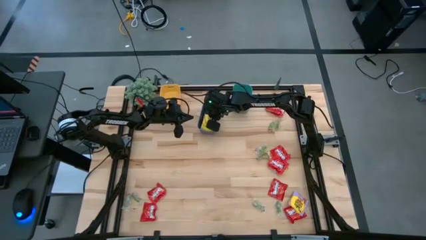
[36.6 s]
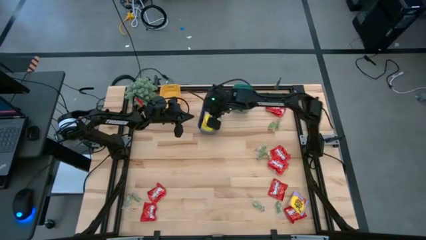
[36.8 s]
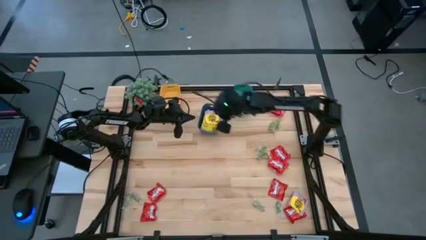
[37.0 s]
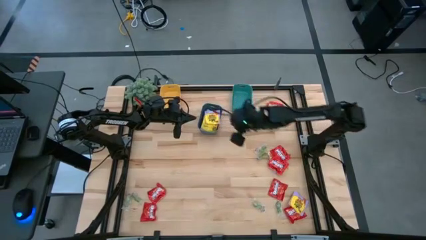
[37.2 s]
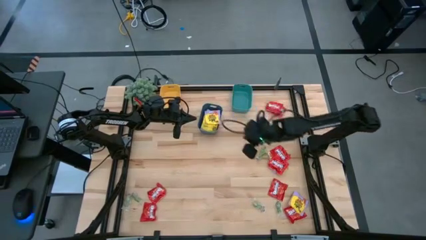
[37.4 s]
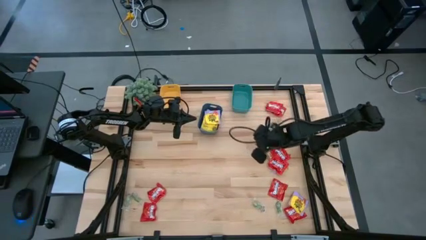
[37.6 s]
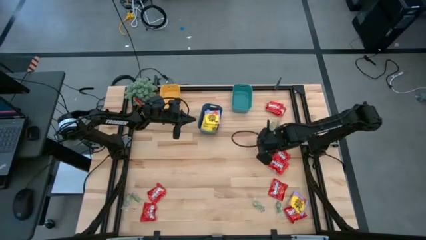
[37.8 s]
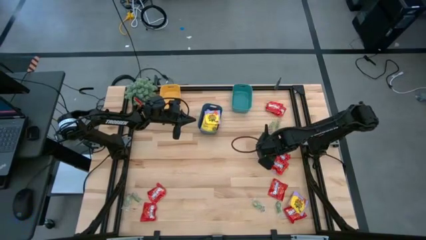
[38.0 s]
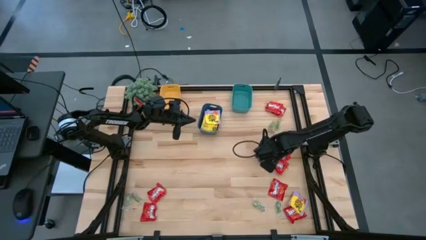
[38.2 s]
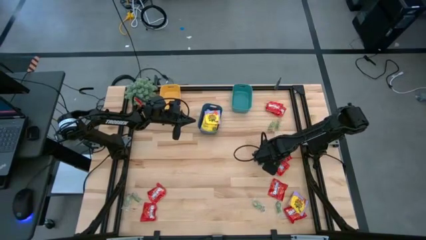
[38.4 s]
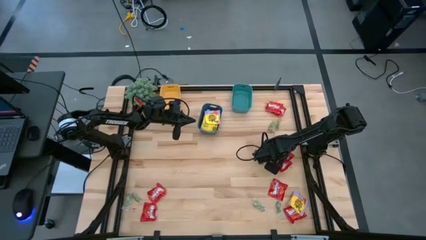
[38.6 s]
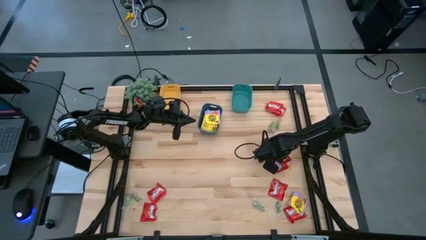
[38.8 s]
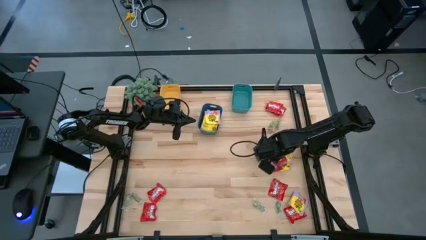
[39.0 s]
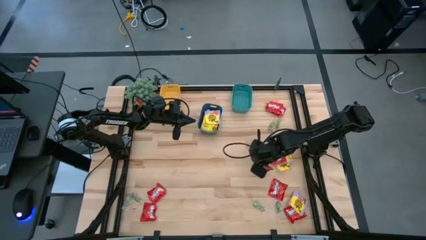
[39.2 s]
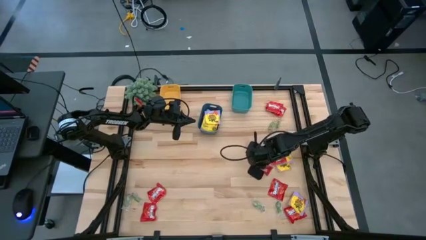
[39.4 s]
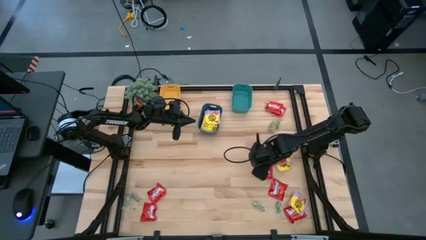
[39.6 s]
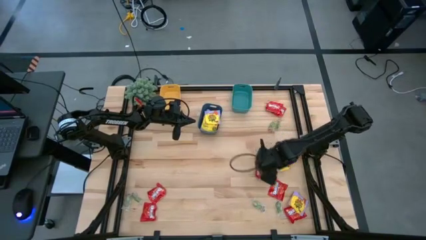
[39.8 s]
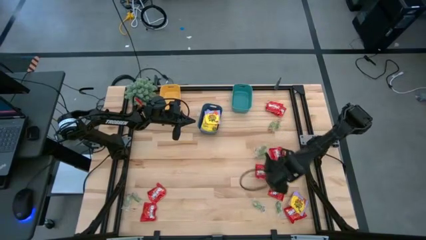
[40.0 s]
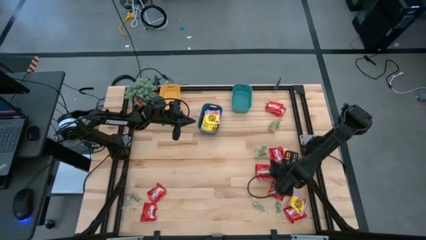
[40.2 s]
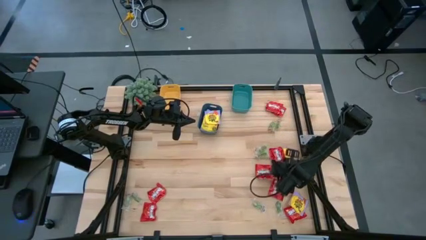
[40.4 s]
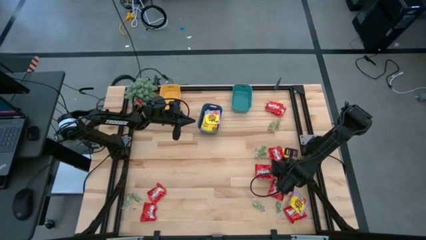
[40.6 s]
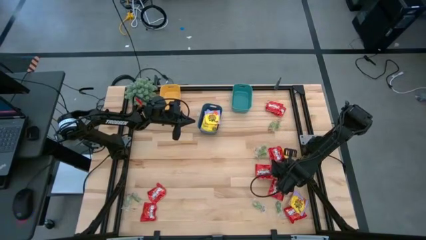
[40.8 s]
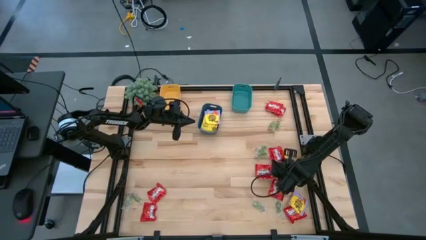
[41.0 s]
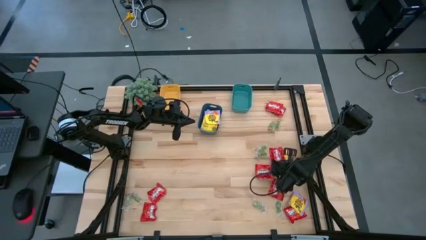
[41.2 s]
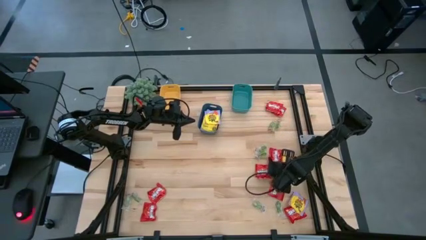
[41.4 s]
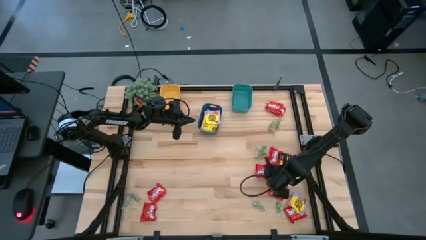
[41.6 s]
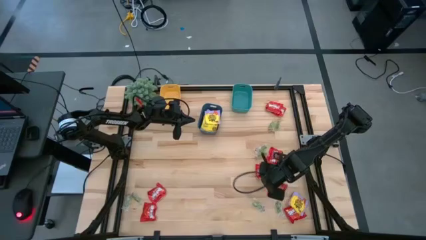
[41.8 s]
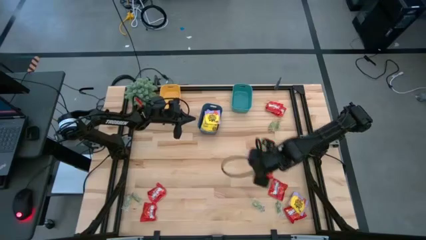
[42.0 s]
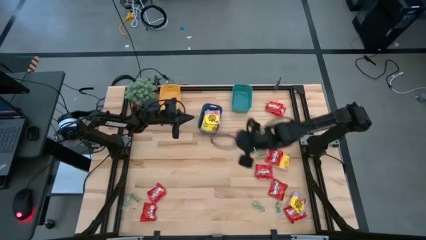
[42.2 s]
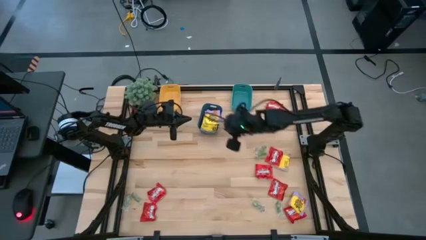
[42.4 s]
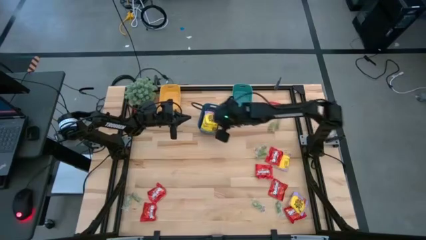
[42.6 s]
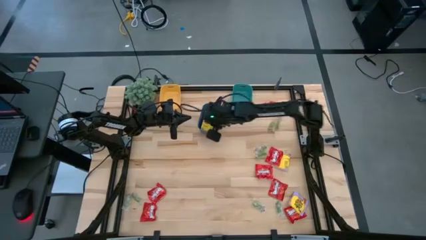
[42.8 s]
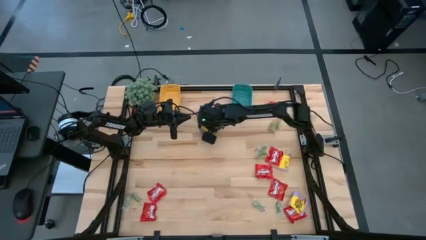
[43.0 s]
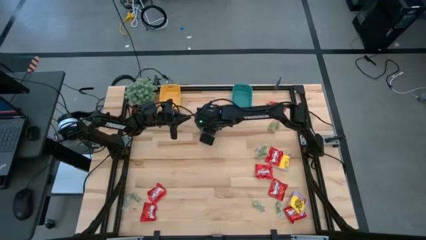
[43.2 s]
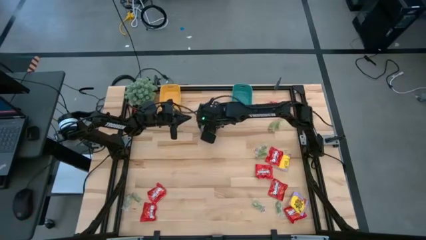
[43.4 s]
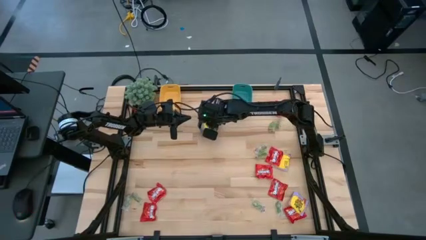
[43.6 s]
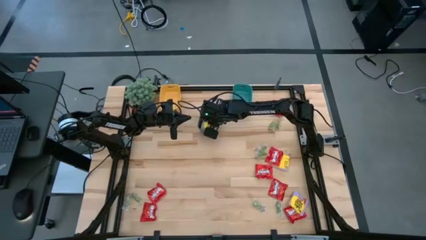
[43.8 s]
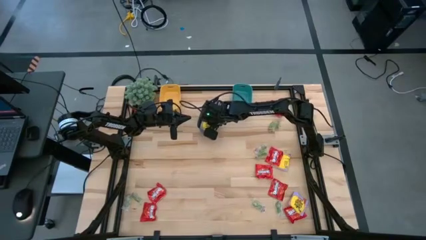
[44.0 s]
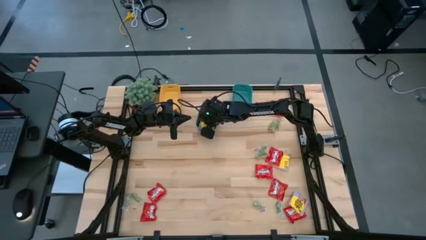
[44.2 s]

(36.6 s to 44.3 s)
Task: Sort candy
Put the yellow candy pack into the blue bin

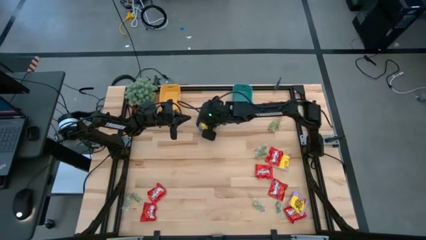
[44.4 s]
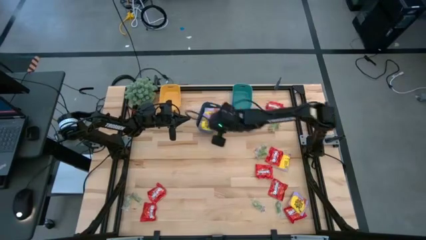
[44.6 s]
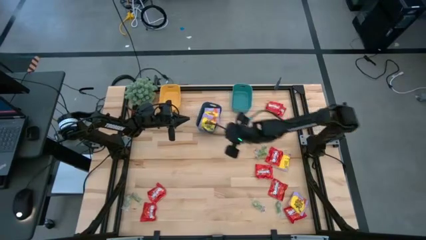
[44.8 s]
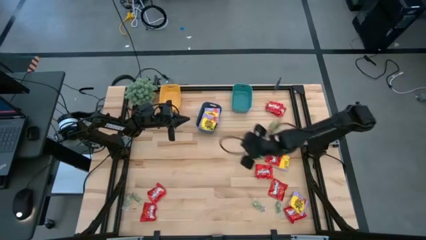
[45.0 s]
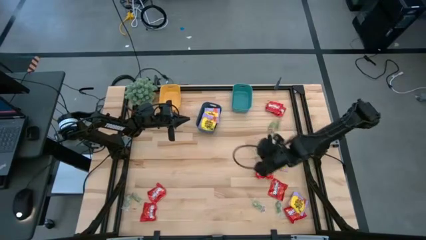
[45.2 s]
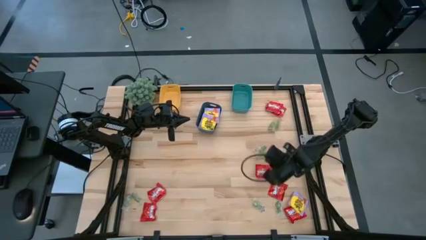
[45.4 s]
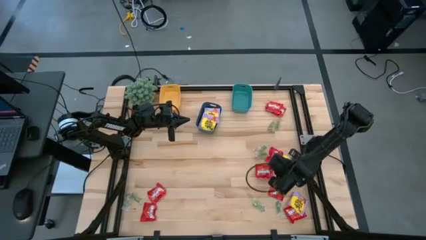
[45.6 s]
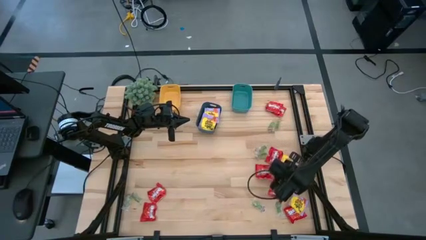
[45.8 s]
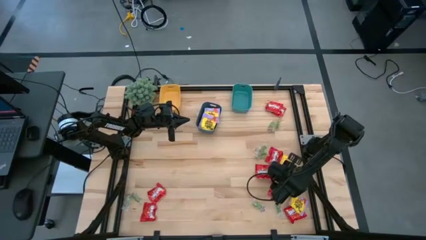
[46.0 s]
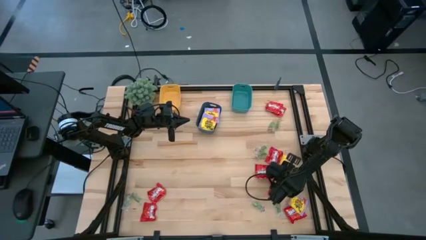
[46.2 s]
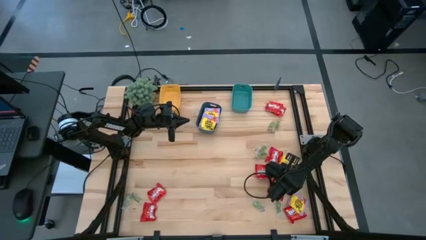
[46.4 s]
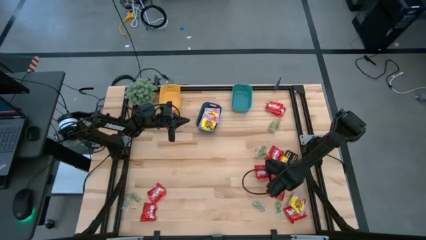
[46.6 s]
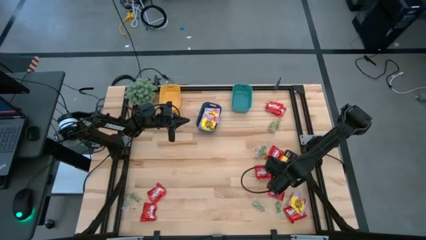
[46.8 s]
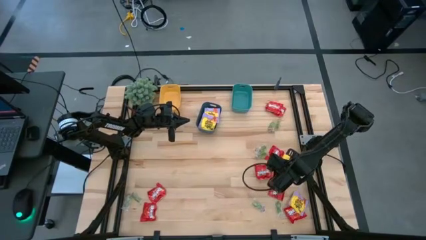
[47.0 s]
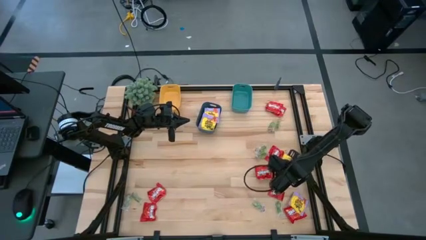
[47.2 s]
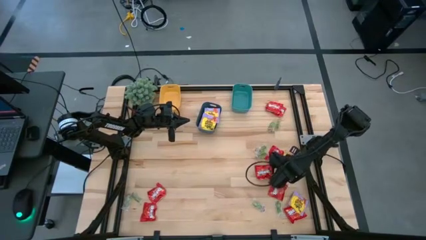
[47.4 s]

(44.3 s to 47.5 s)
Put the yellow candy pack into the blue bin

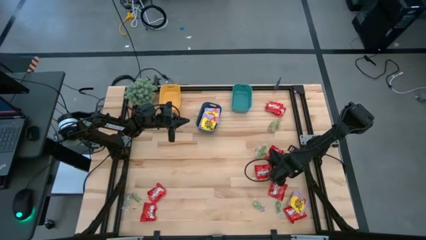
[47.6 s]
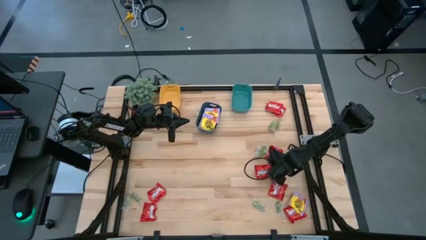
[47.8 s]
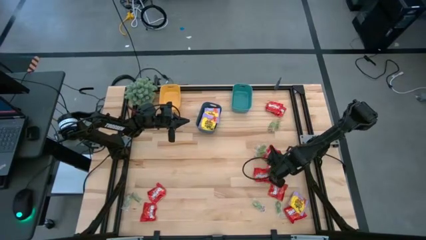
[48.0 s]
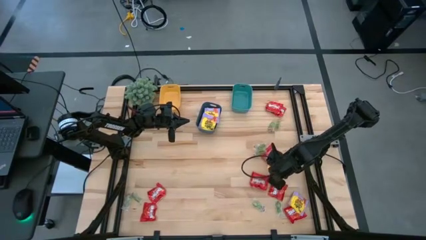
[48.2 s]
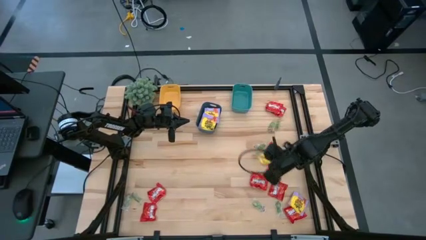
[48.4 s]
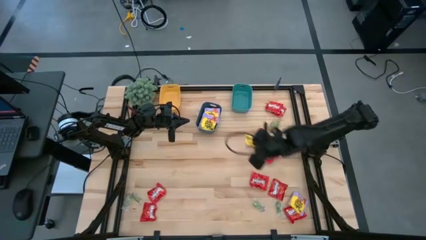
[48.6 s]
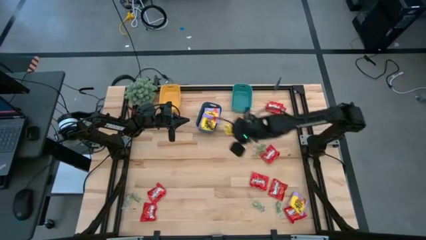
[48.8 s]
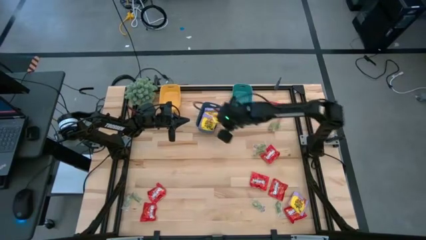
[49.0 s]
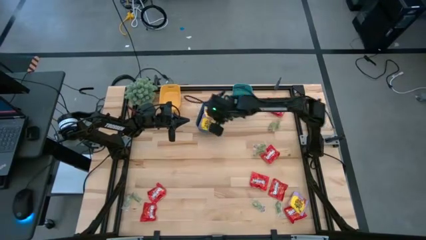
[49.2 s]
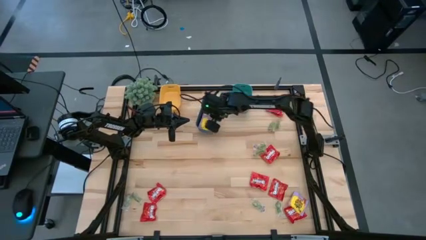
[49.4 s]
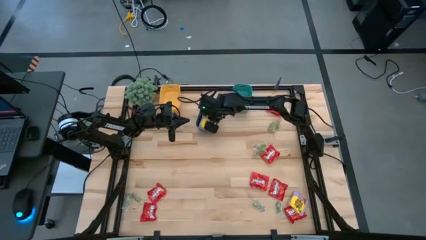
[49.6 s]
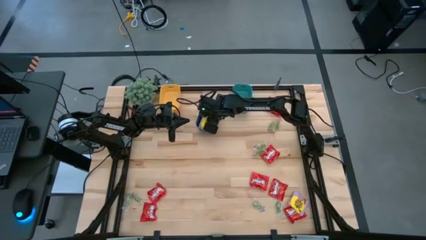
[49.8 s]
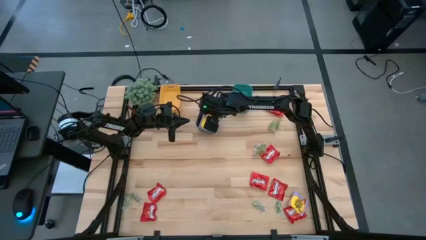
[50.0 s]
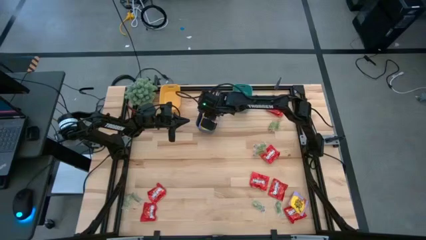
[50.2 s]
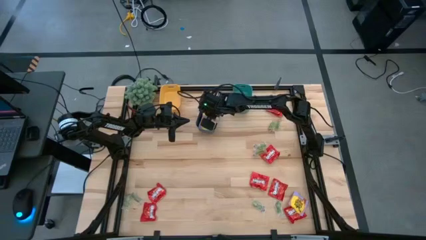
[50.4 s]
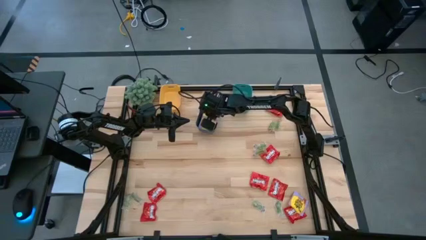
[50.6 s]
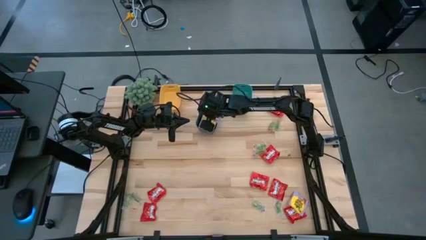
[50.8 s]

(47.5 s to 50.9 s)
Put the yellow candy pack into the blue bin

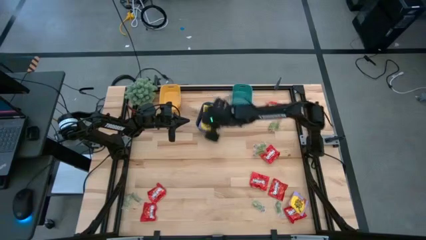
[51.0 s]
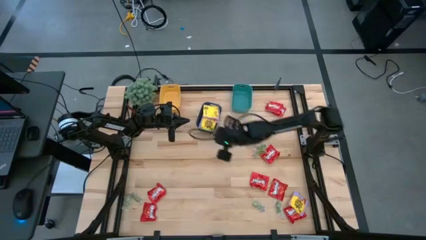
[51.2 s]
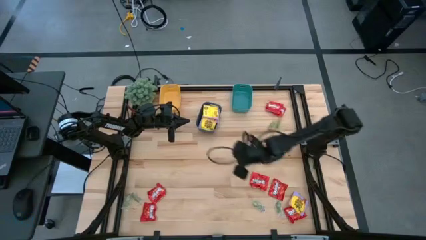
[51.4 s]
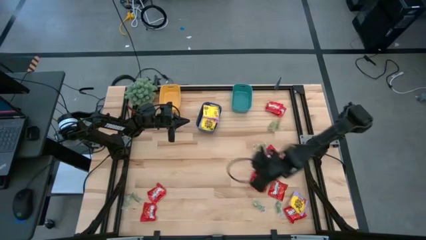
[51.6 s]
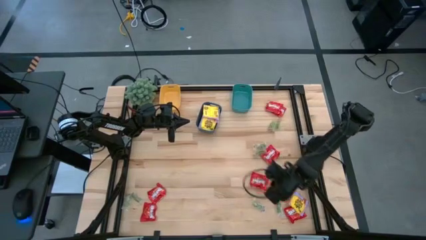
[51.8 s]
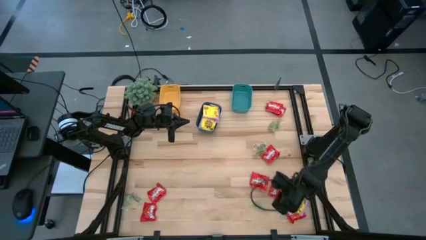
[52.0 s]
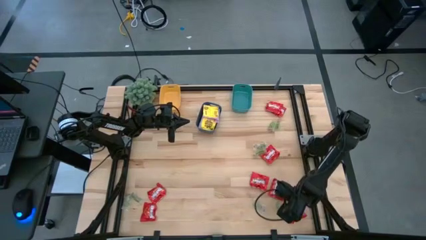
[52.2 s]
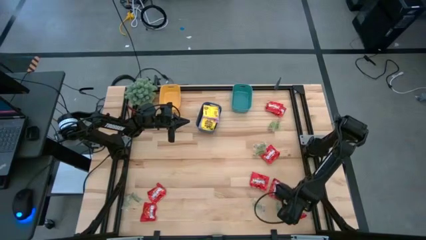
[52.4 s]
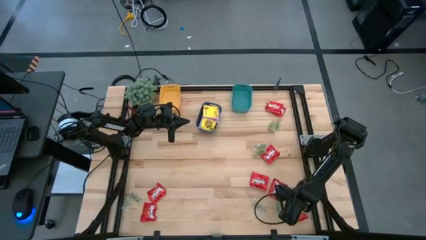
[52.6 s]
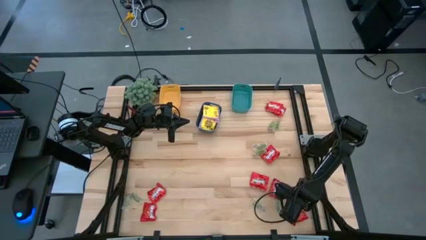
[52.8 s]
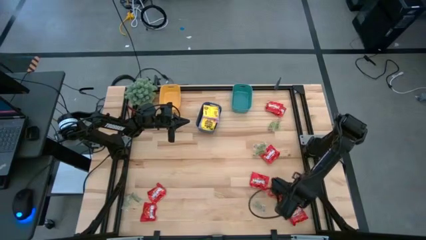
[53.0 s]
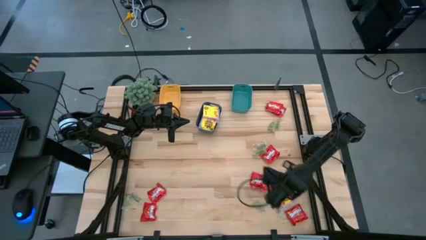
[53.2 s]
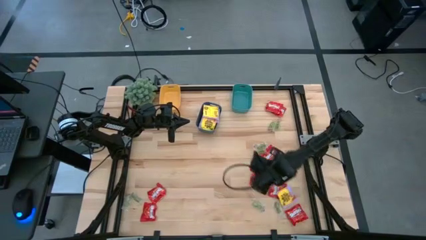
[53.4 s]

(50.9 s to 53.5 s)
Put the yellow candy pack into the blue bin
